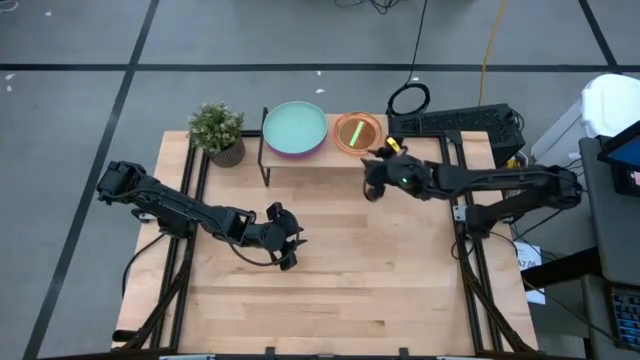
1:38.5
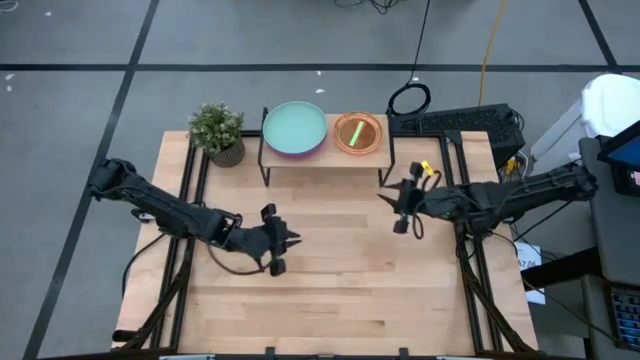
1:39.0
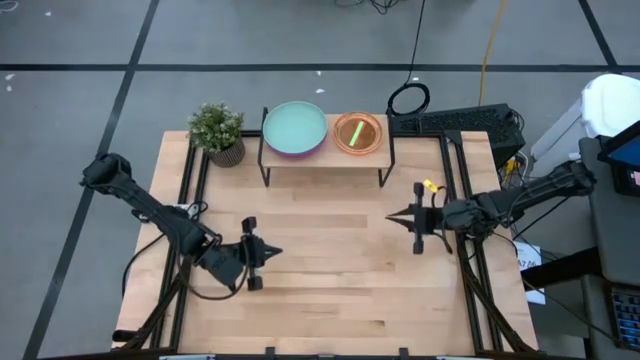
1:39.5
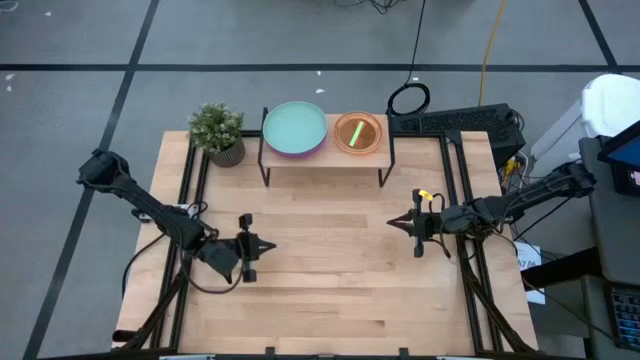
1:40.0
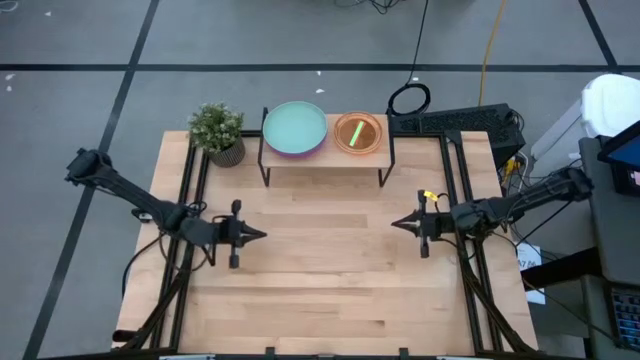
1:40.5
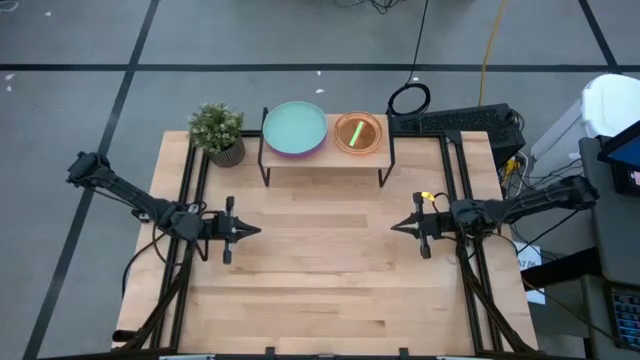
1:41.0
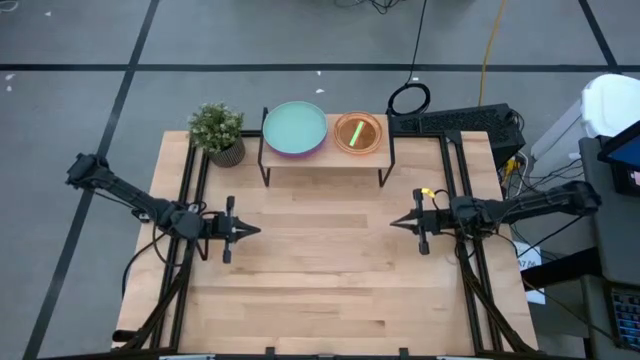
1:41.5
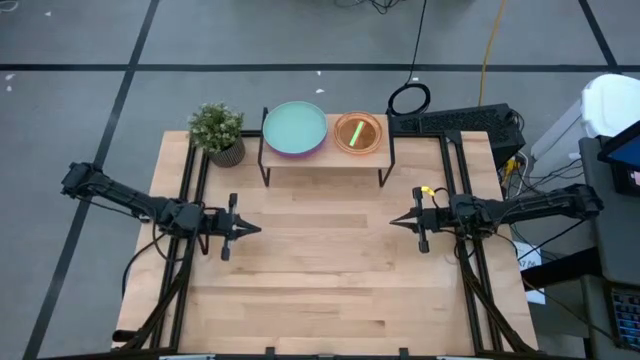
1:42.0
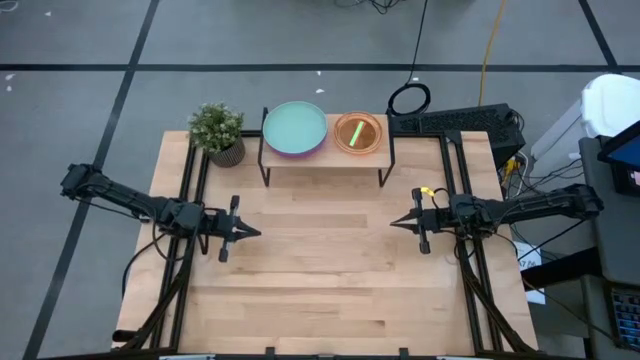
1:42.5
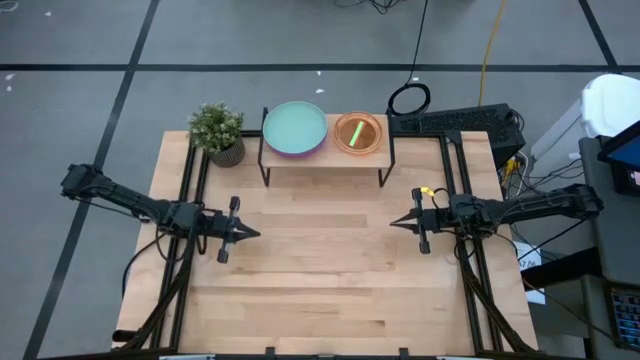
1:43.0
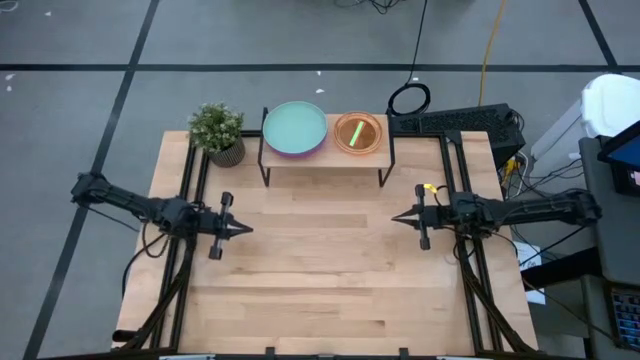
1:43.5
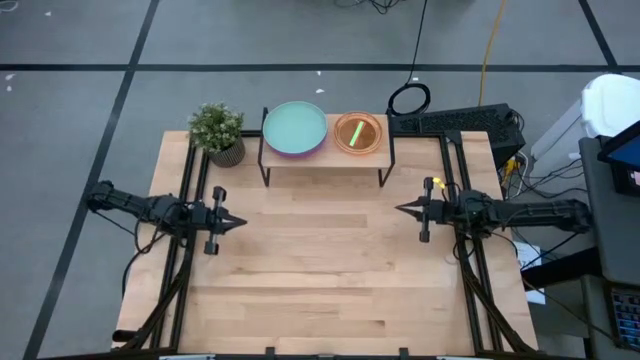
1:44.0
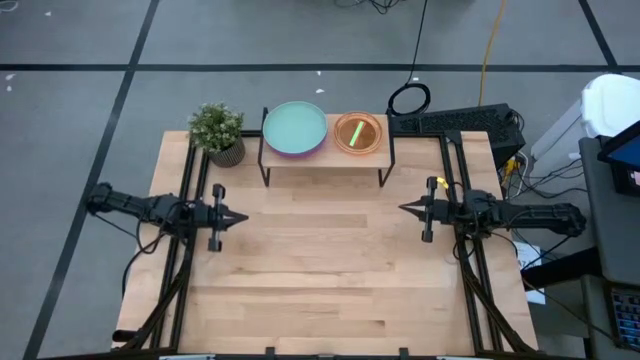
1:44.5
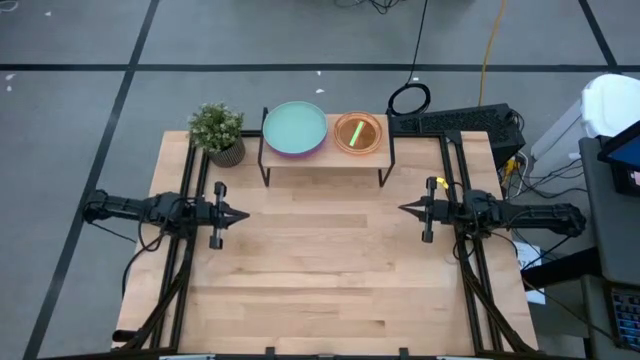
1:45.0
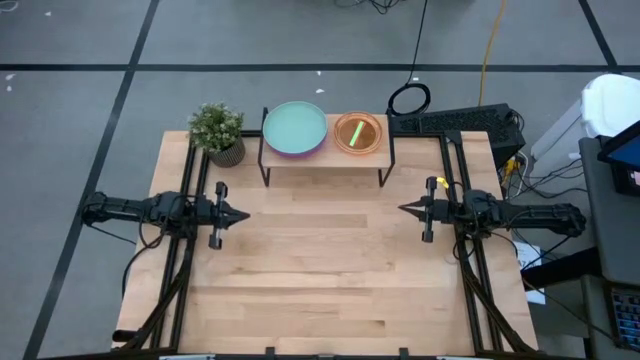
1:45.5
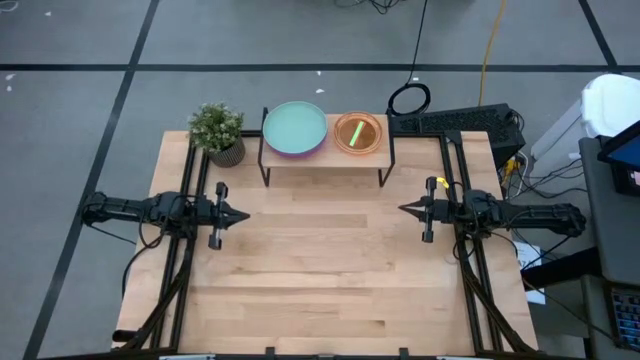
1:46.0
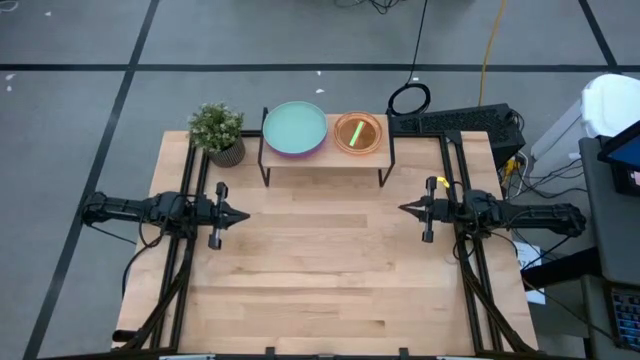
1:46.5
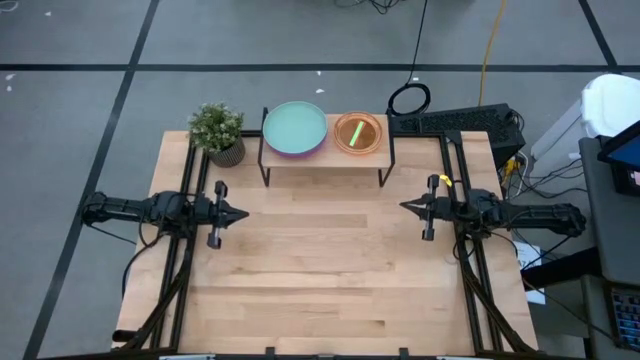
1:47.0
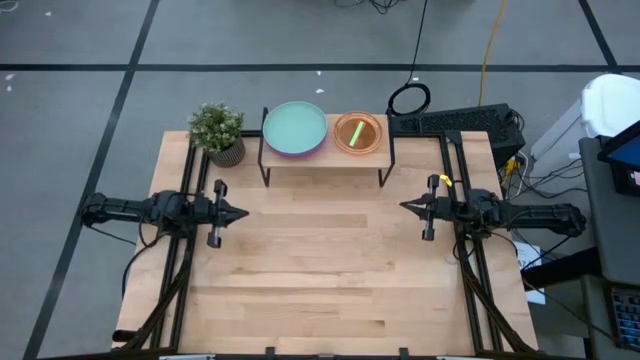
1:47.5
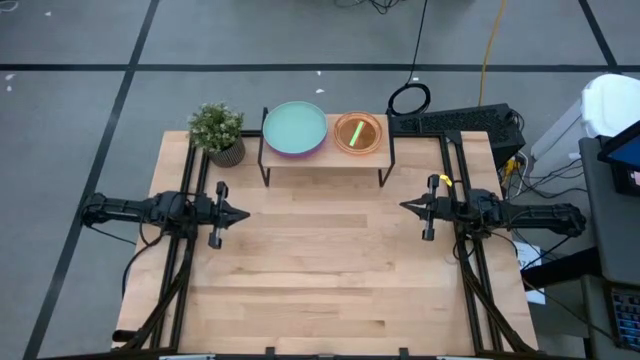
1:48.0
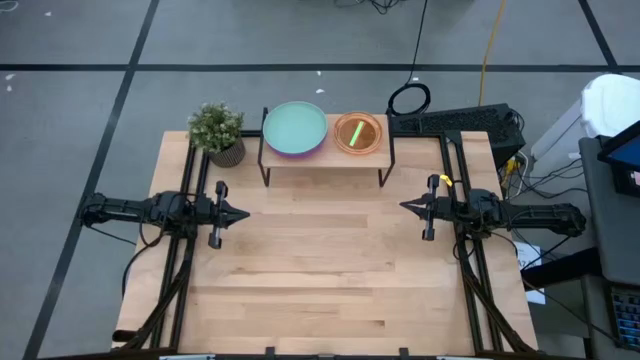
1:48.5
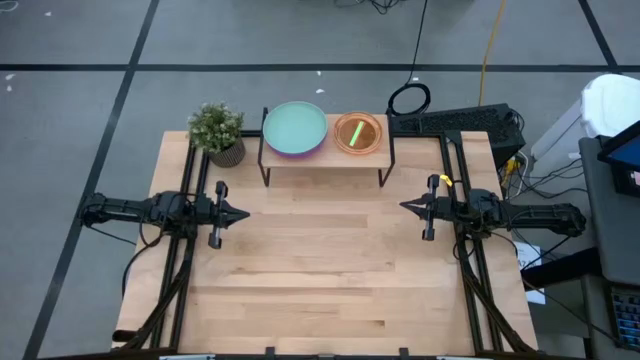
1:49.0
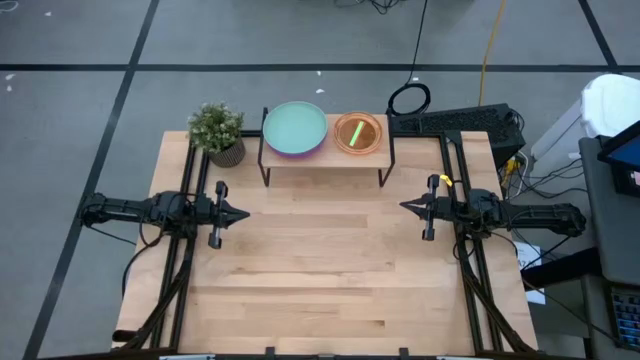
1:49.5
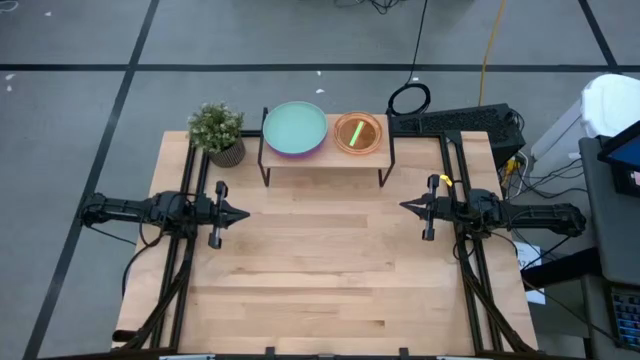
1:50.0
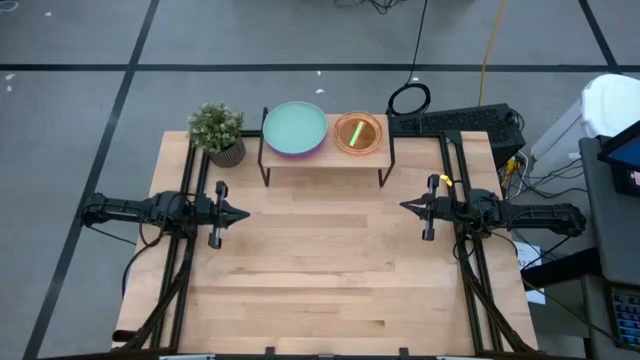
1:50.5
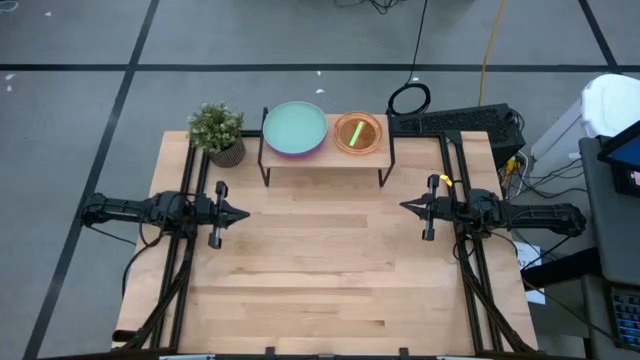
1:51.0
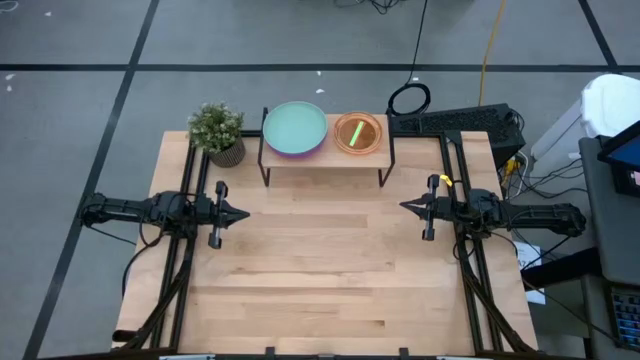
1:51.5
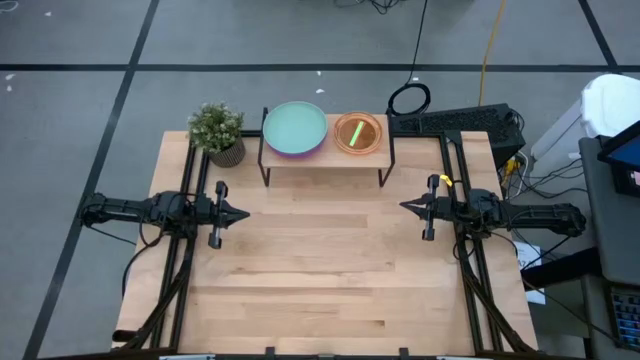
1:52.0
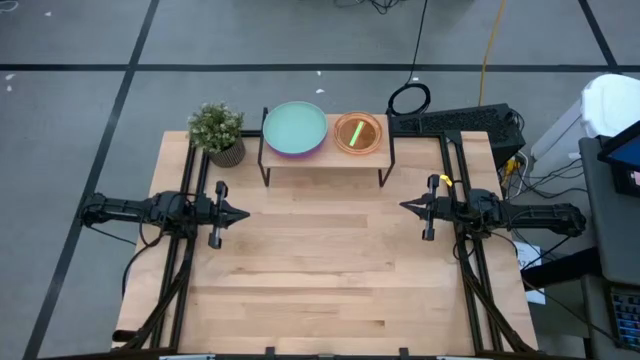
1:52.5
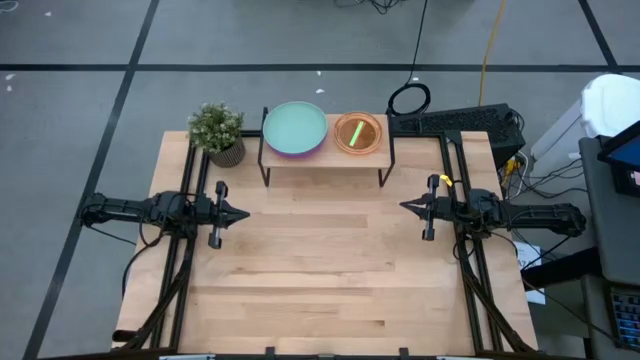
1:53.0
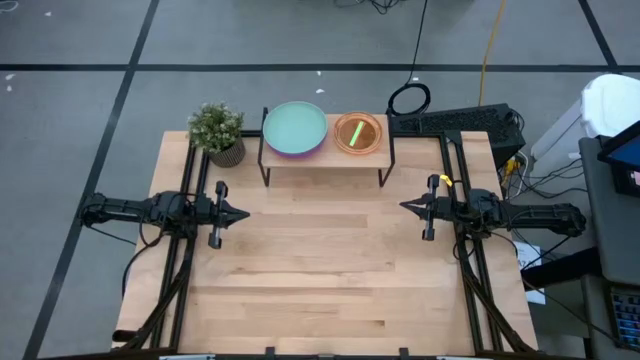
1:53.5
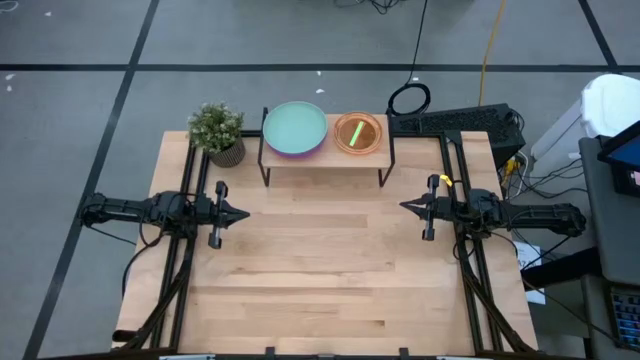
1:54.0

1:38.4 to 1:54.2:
Task: Place and stack plates onto a shelf
Return to Home Position

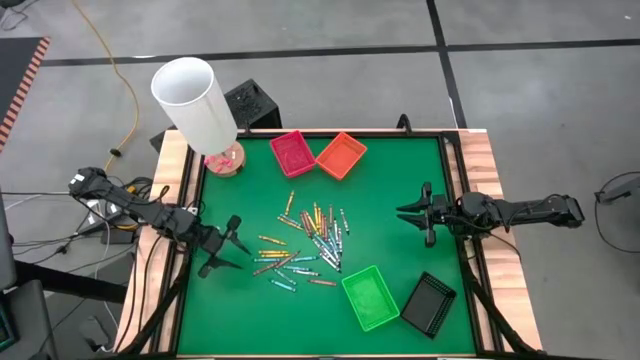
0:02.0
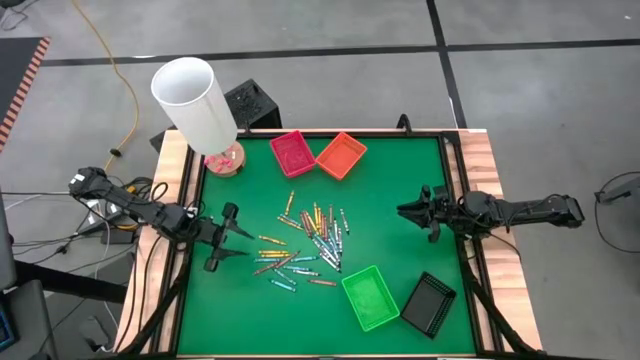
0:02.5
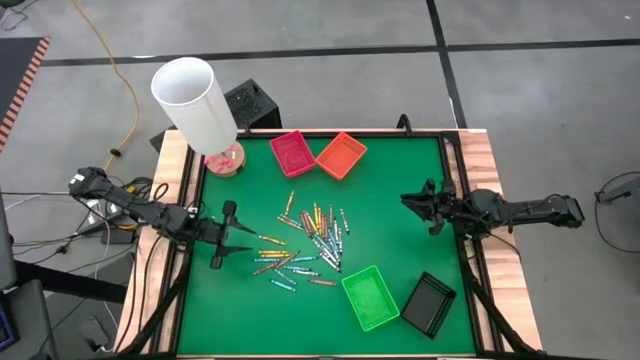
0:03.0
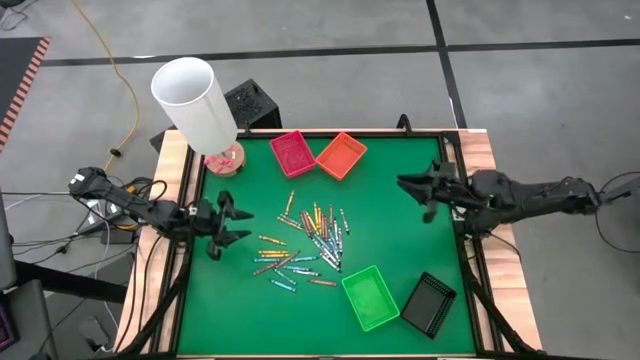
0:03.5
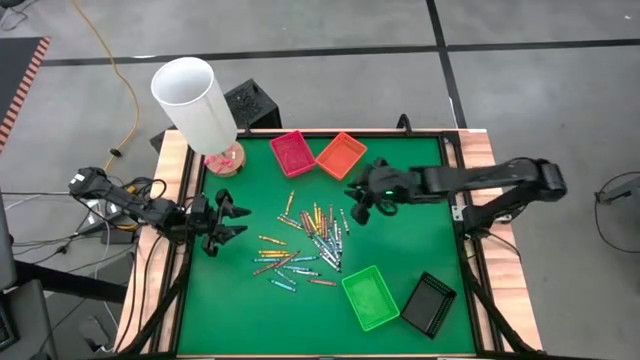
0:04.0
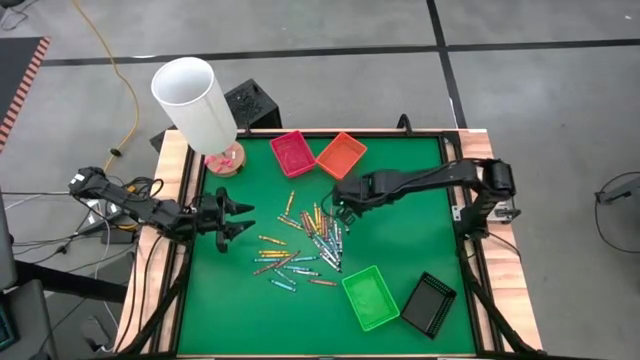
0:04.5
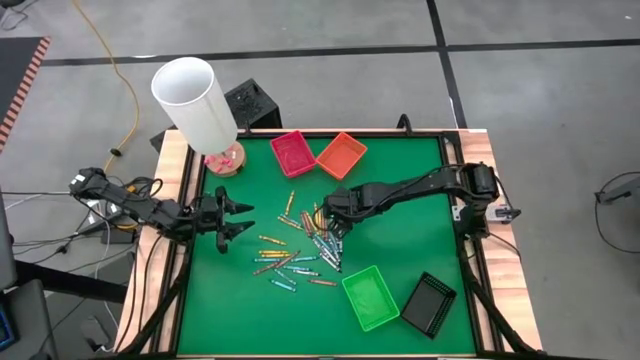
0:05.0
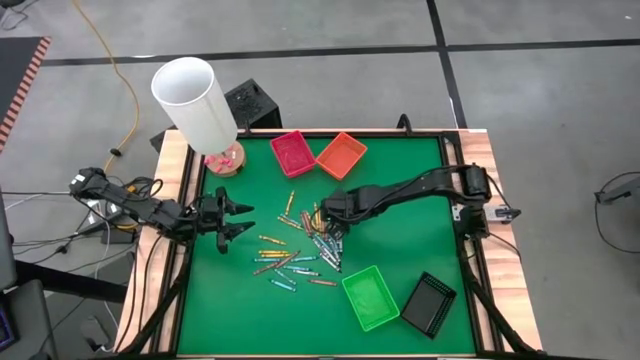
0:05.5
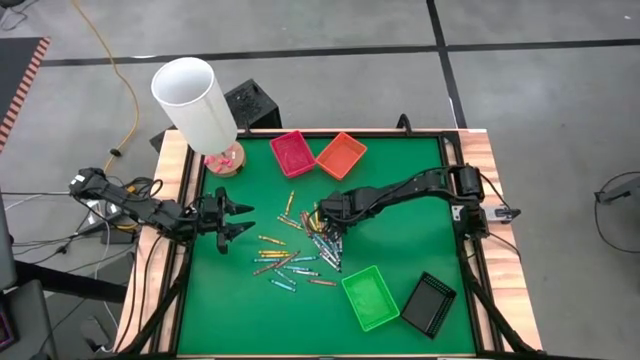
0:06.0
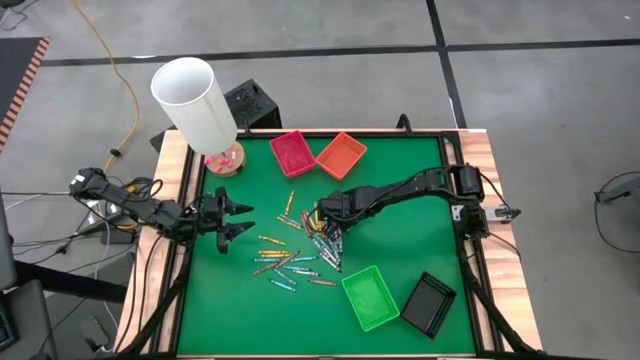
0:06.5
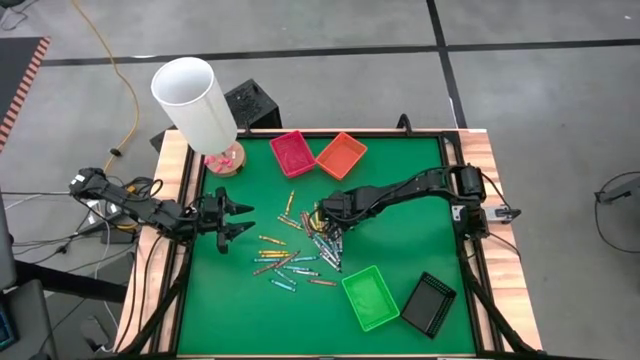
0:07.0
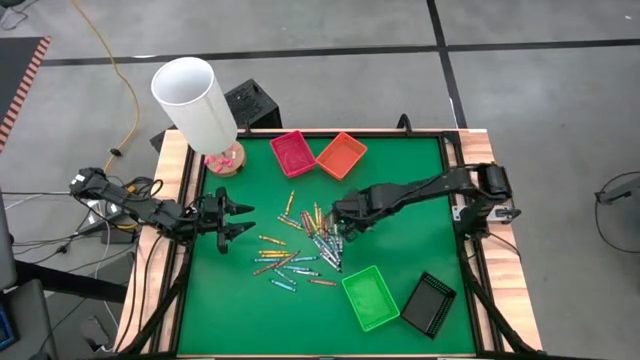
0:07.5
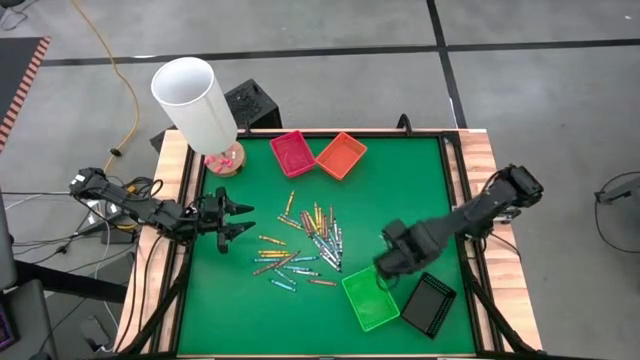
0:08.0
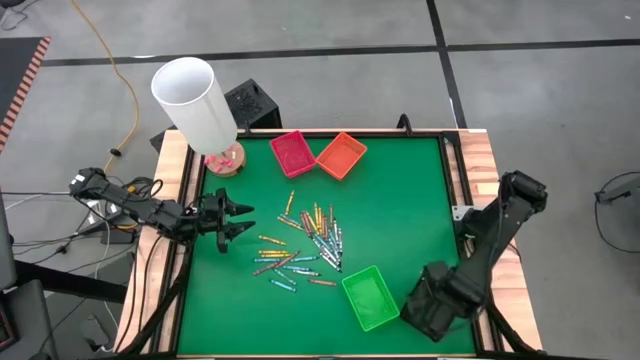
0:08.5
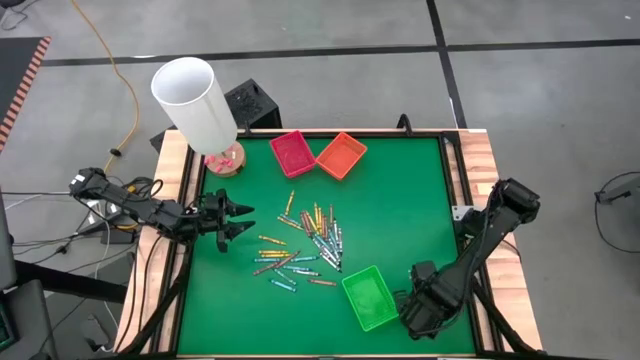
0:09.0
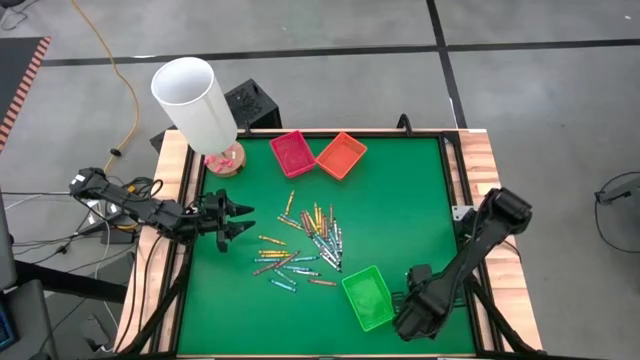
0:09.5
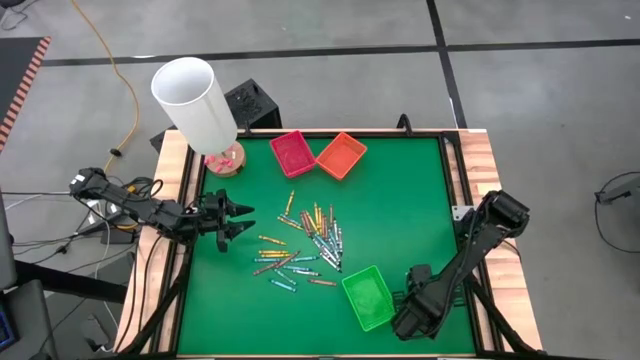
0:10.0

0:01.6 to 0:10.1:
Task: Sort crayons
Put the black crayon into the black bin
